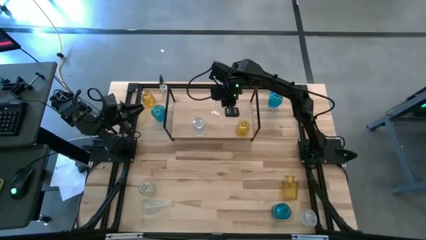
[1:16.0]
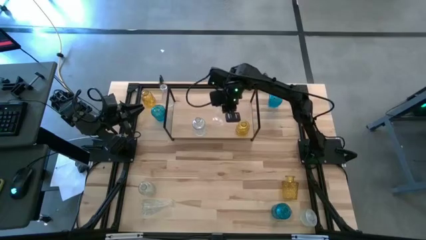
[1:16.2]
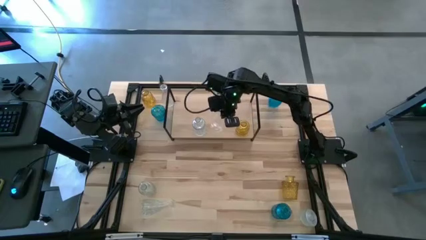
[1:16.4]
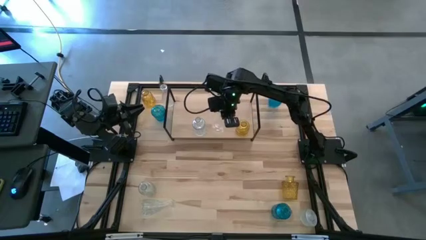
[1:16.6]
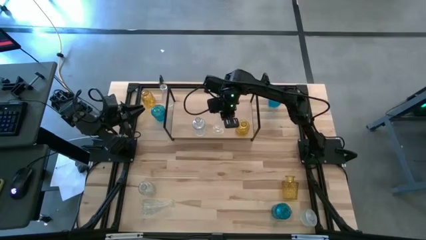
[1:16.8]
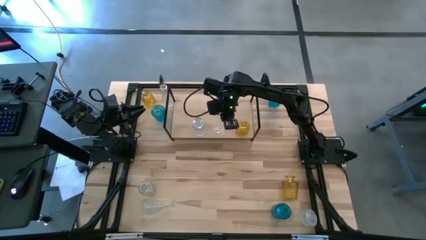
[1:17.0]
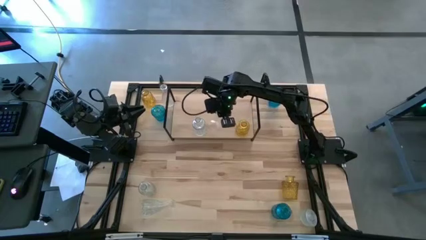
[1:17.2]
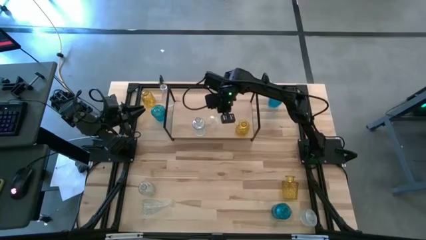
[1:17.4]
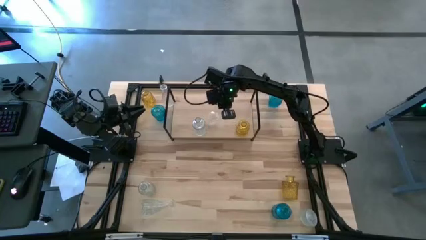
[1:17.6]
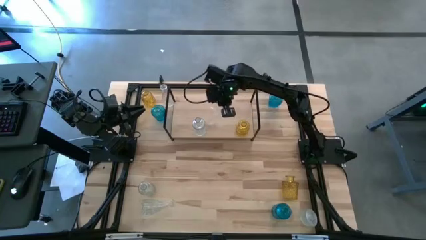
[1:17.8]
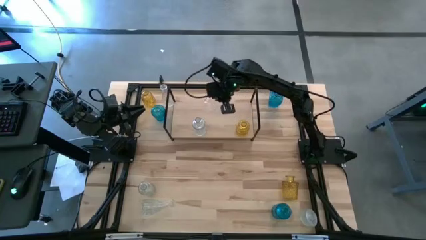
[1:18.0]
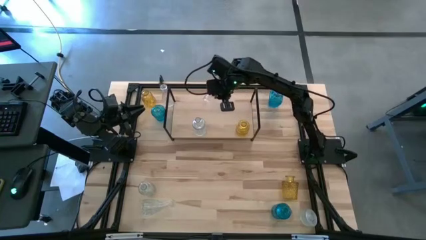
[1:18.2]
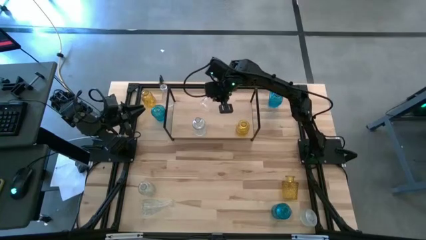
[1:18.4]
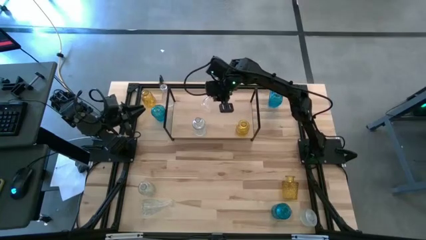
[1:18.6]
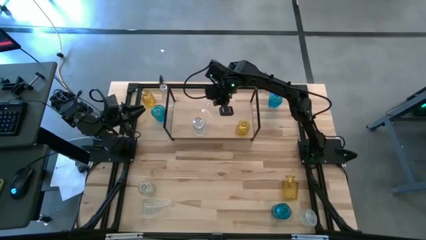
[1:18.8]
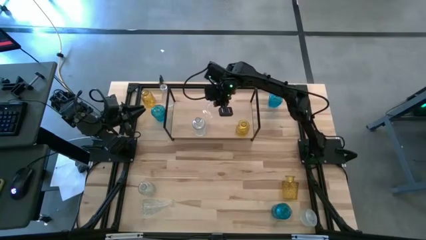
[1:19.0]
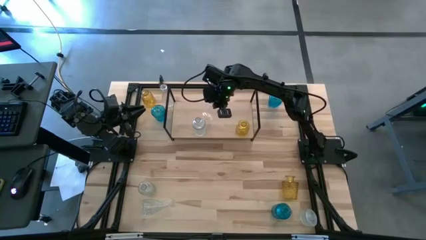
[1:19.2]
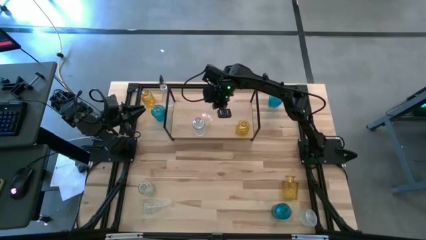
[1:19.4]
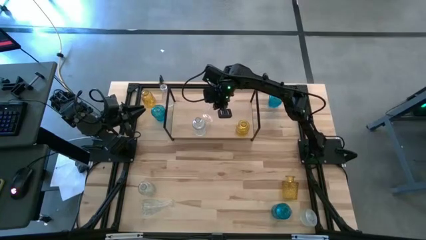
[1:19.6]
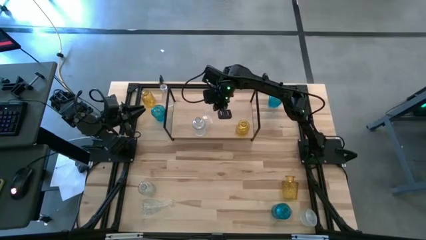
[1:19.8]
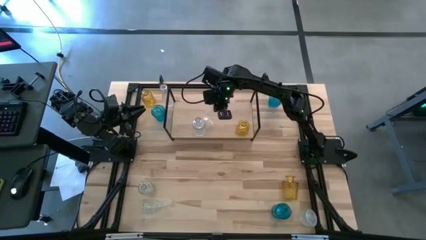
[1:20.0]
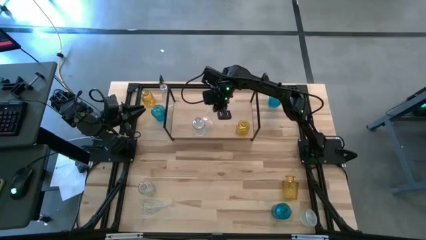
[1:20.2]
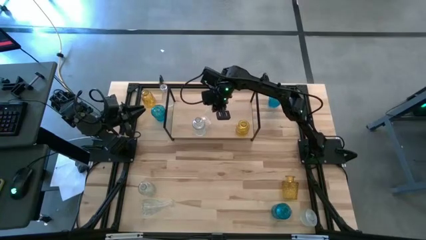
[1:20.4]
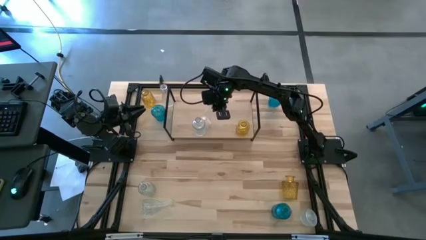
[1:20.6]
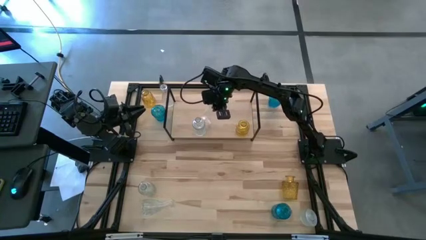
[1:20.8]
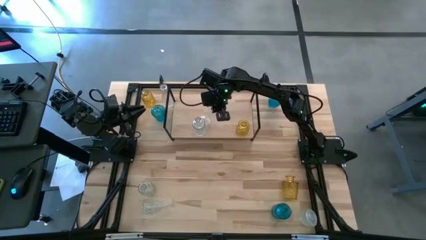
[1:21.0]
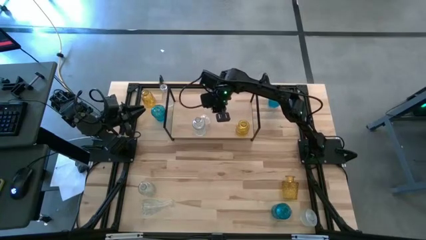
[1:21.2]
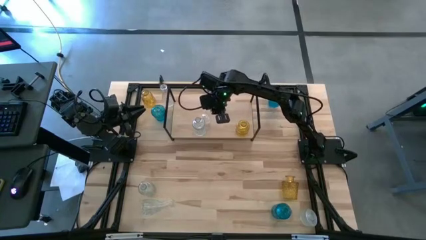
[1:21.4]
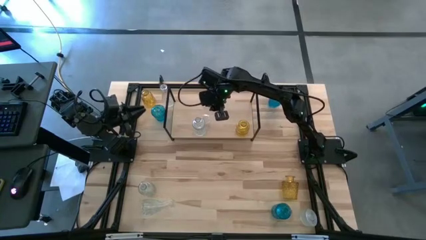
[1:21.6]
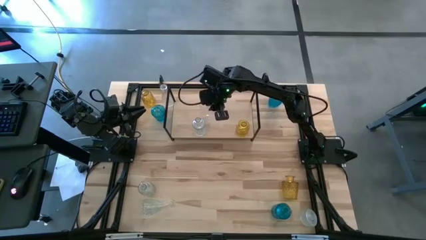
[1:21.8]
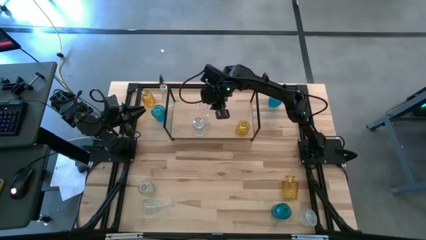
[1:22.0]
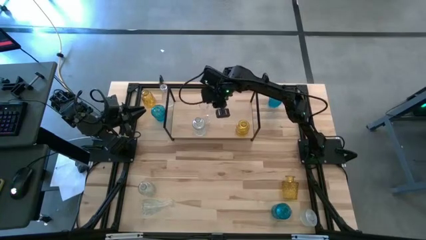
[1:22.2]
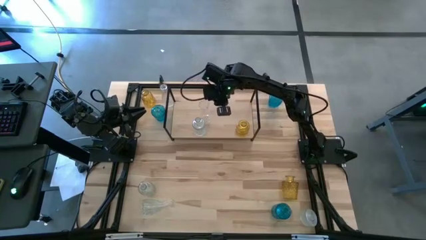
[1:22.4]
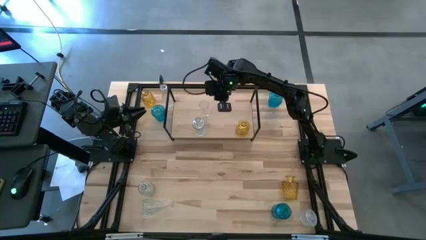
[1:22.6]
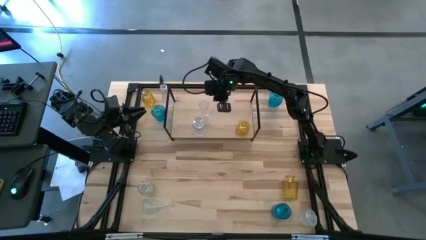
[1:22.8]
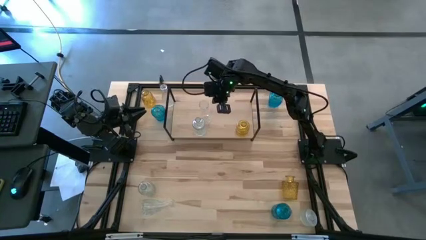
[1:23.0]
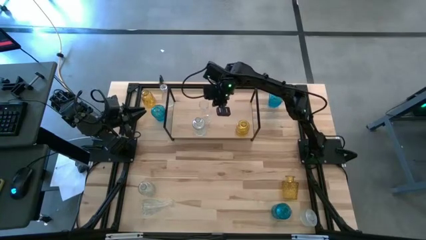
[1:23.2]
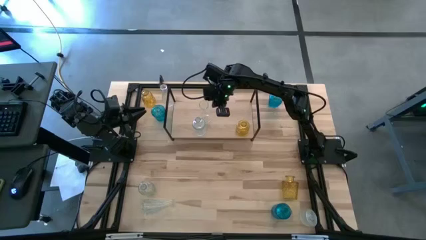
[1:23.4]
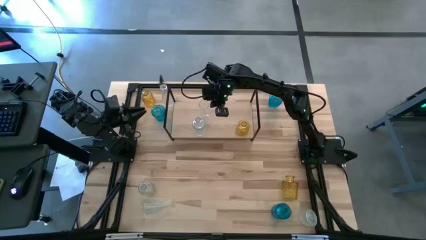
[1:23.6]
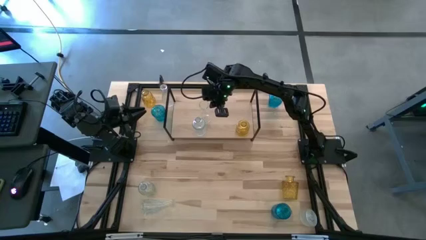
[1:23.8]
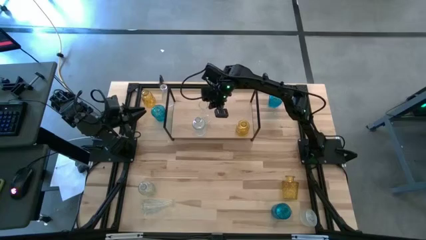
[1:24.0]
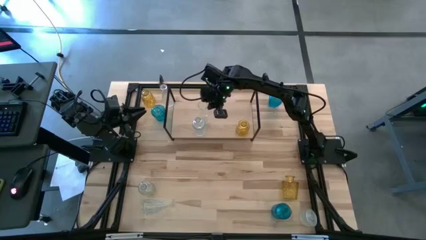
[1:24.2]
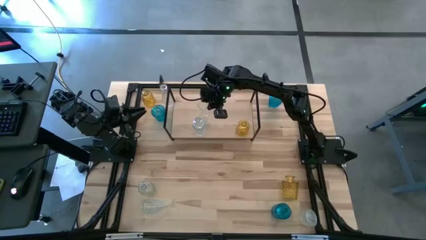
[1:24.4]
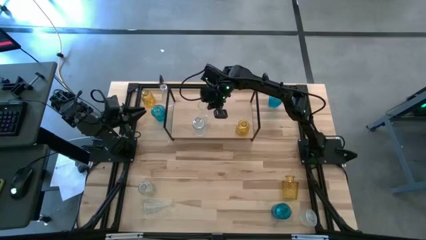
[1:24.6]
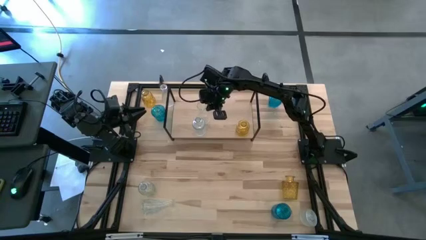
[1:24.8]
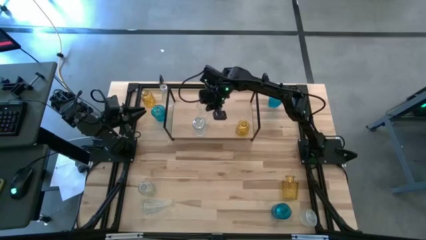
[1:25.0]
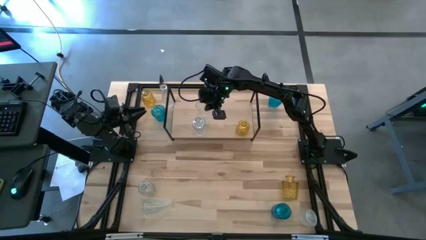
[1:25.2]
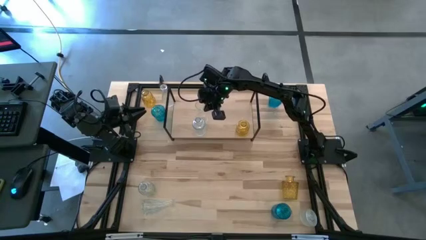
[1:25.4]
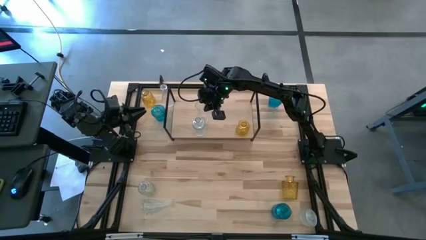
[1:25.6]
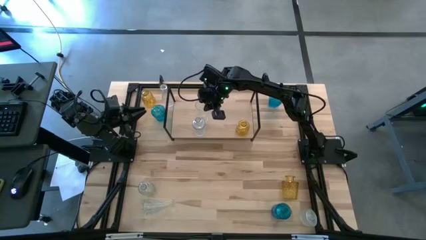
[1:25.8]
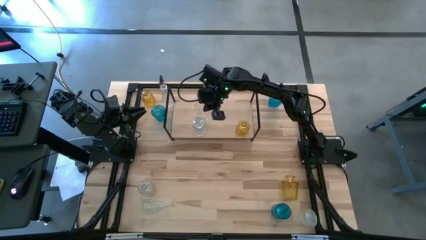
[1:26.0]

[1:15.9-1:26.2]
Task: sort vases onto shelf
Put the transparent vase on the shelf aligned with the other transparent vase
